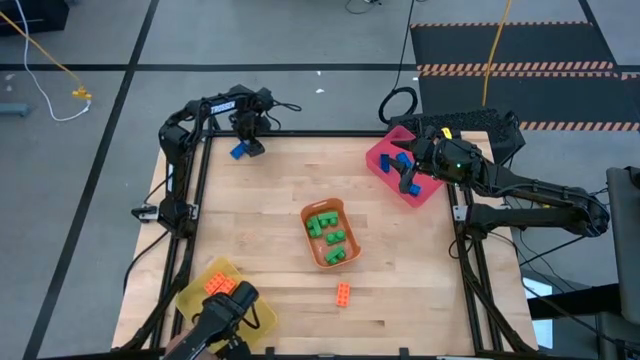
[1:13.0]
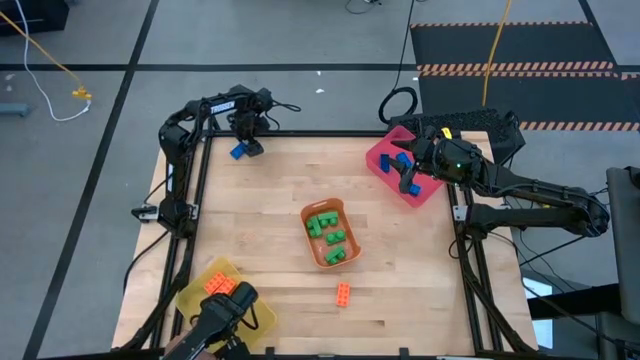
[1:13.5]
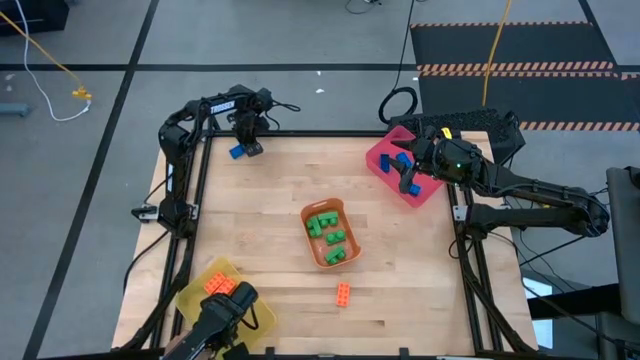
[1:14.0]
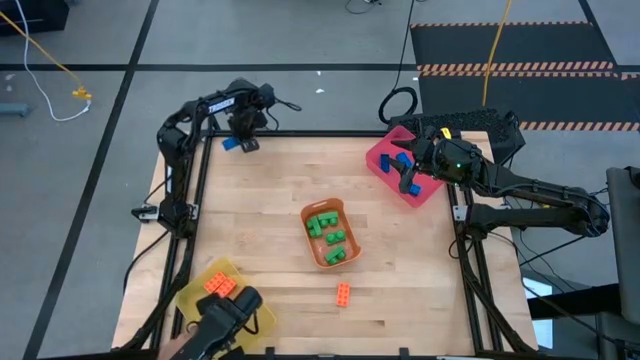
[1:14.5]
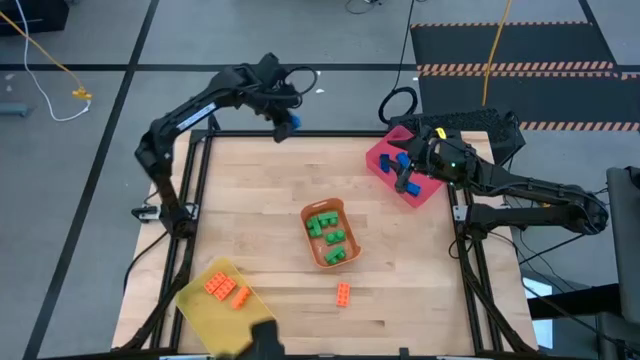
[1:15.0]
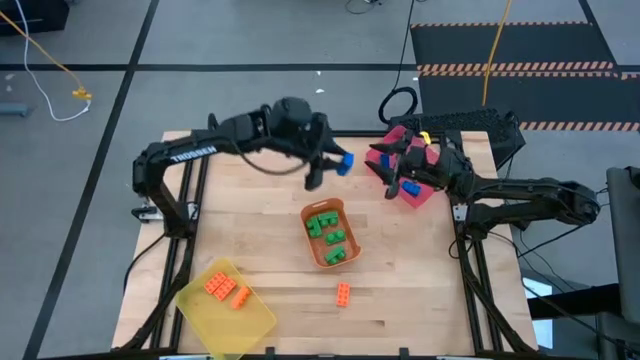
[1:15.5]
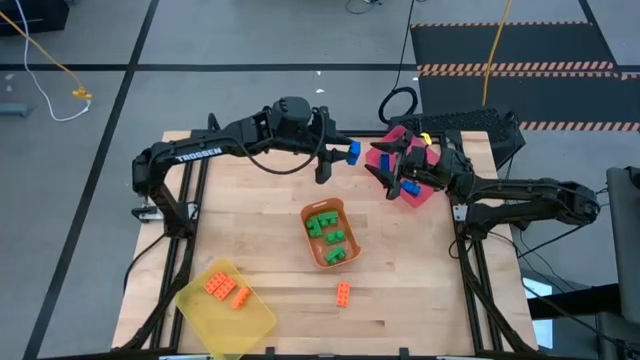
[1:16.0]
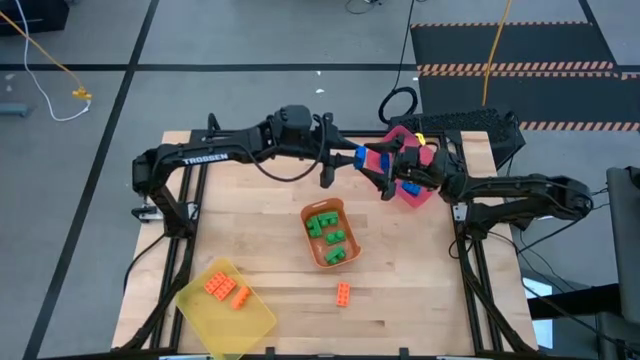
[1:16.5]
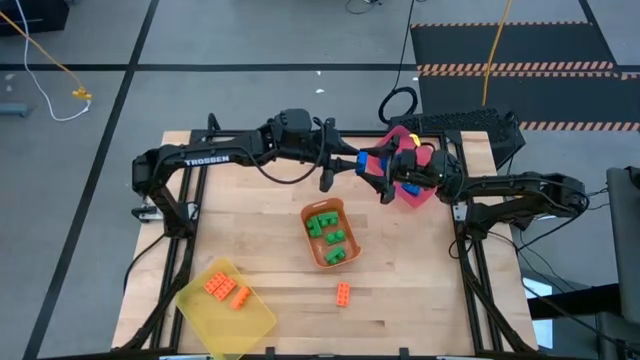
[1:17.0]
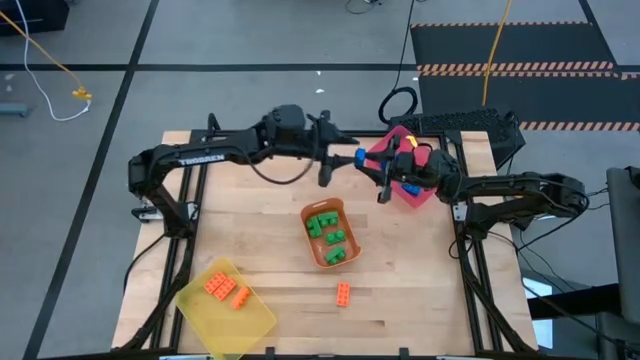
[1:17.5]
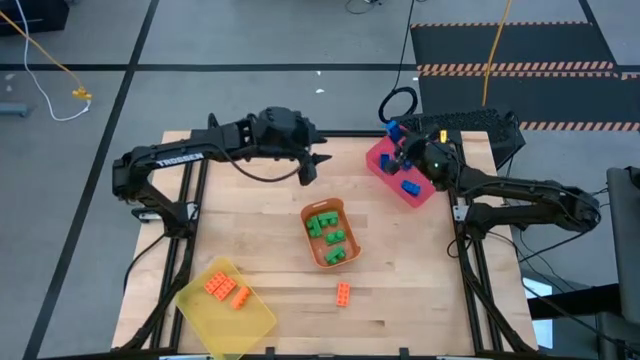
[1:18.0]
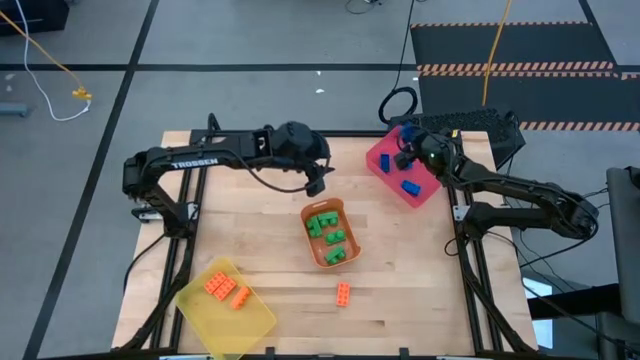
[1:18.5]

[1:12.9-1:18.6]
Task: Sort & place blocks by color
Put the blue game piece into the pink bin

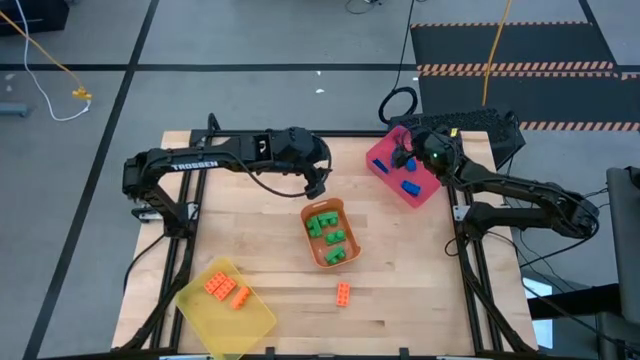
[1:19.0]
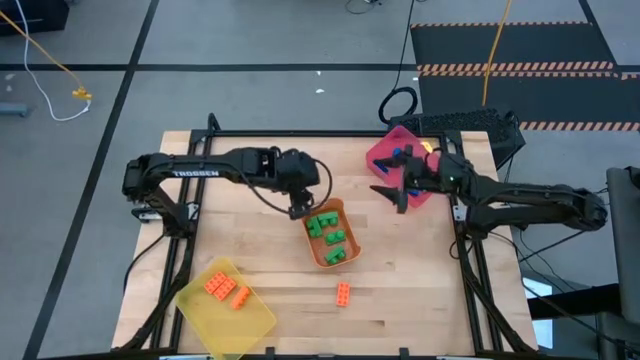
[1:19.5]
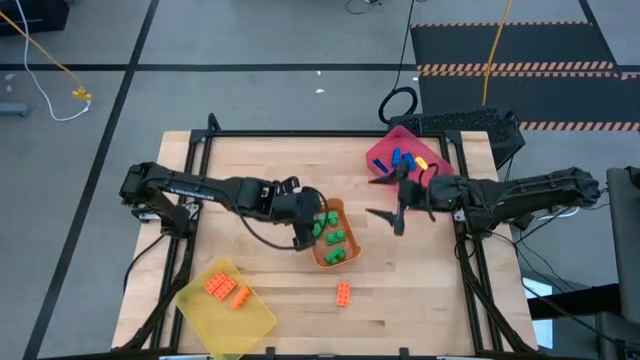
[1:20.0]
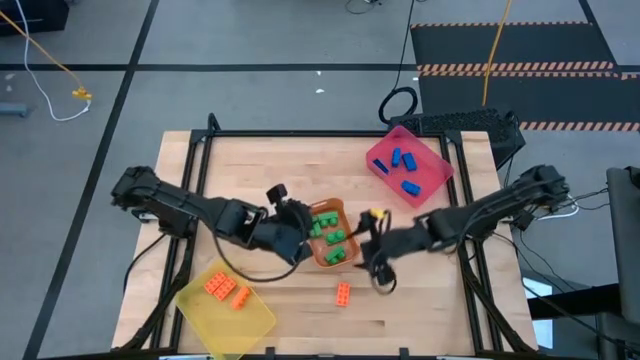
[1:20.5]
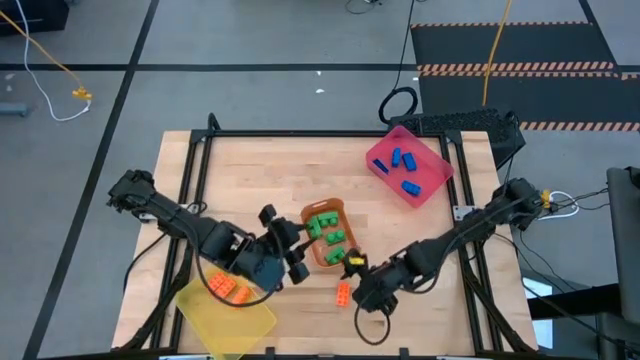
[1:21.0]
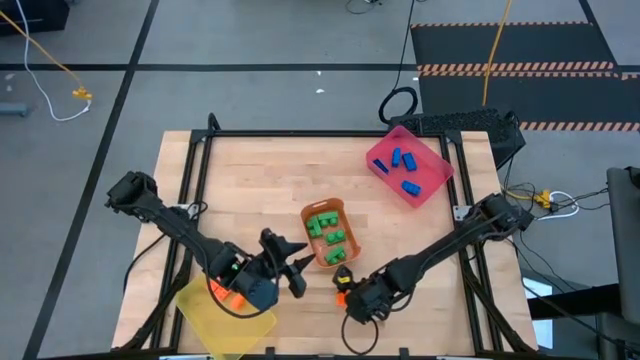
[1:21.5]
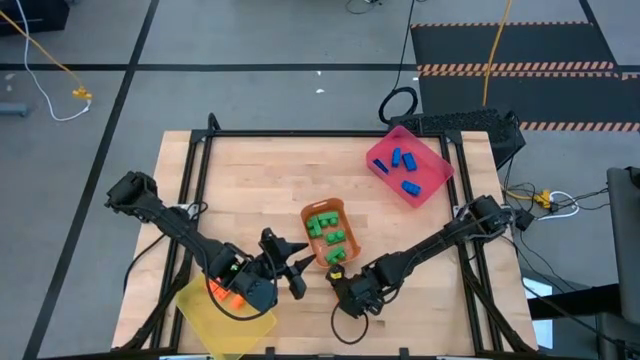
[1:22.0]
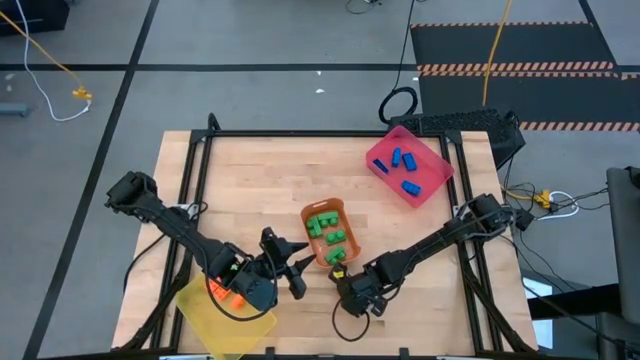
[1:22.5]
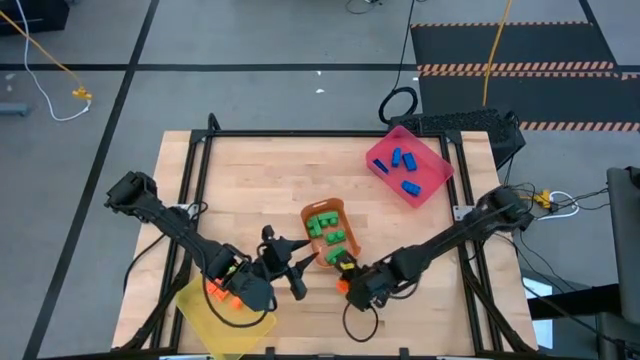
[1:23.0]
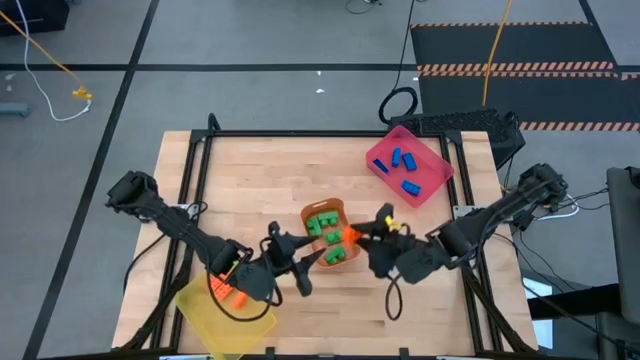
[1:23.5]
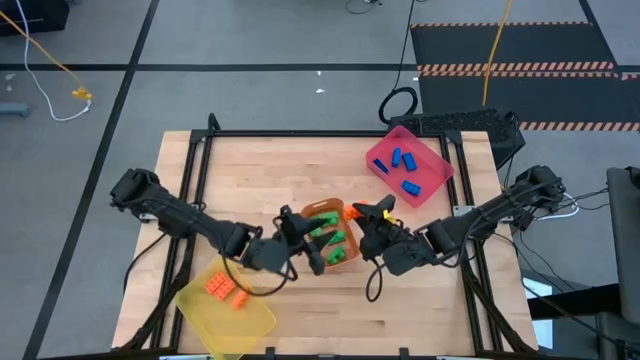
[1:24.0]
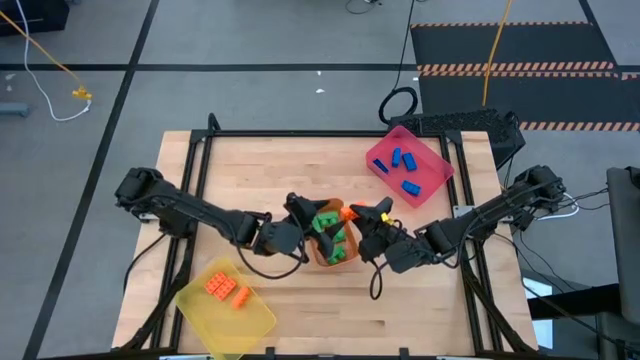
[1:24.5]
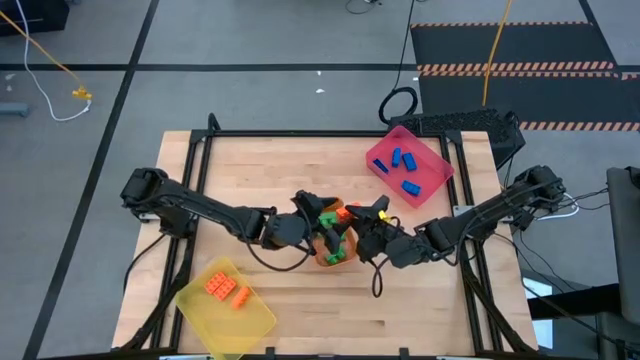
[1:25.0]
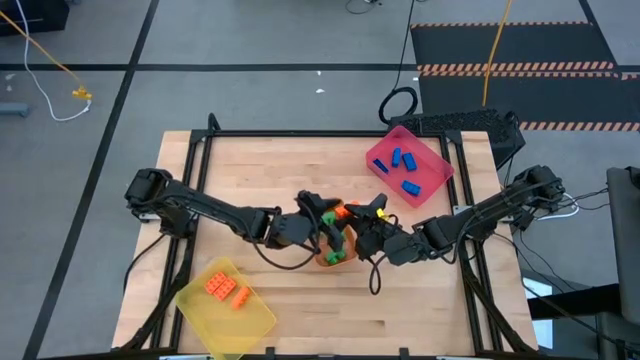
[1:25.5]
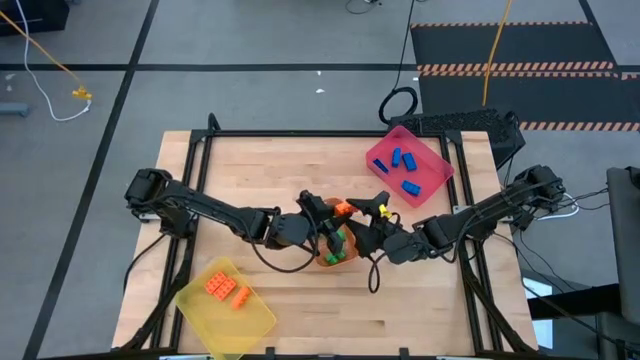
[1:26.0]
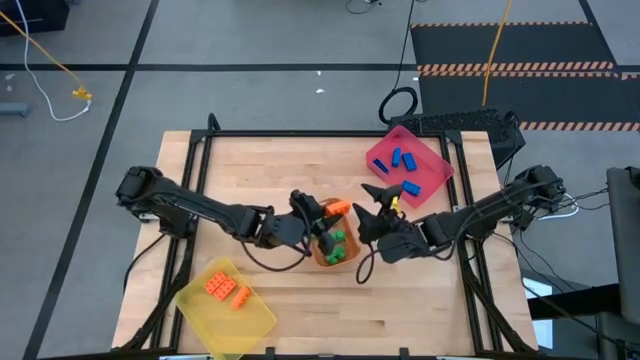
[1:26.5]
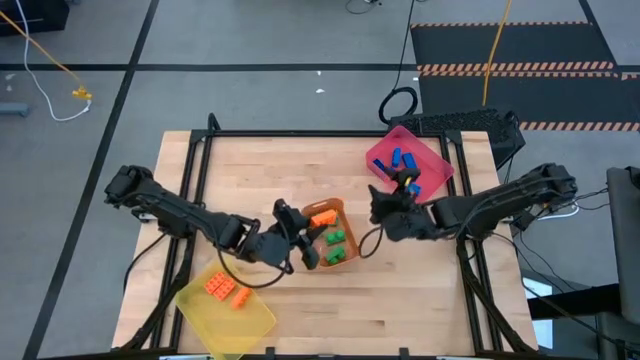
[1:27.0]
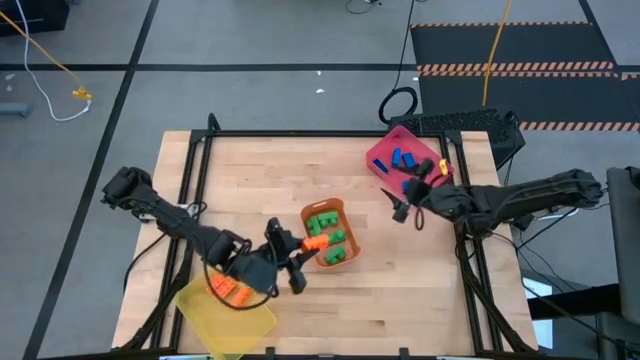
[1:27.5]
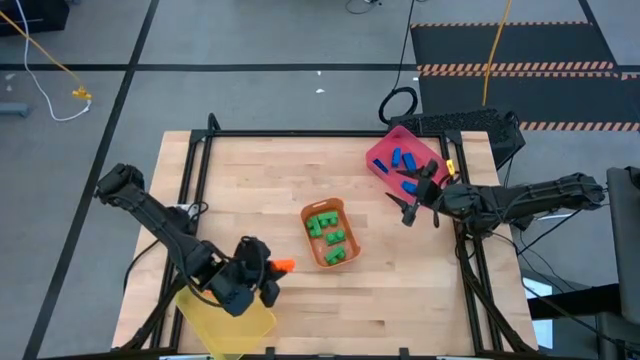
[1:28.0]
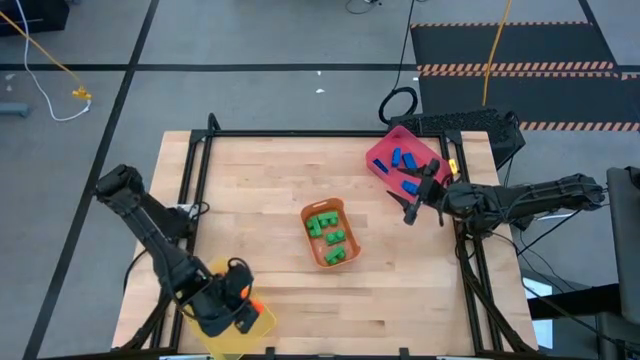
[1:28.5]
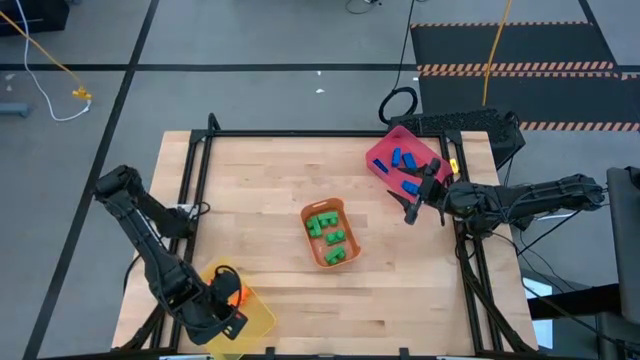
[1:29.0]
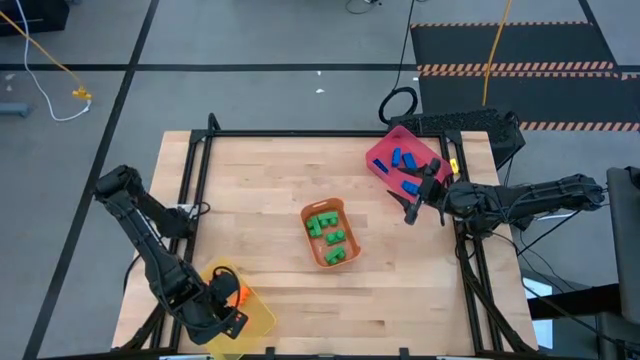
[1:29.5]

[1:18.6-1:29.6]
Put the orange game piece into the yellow bin

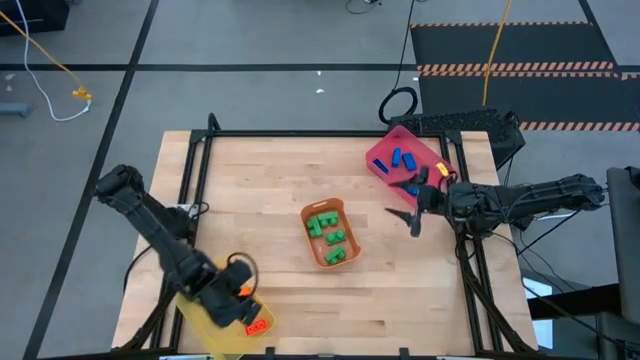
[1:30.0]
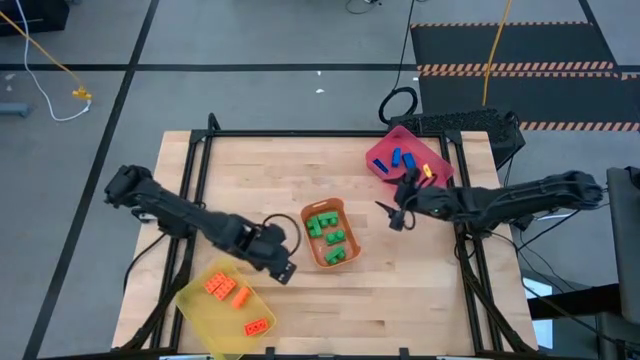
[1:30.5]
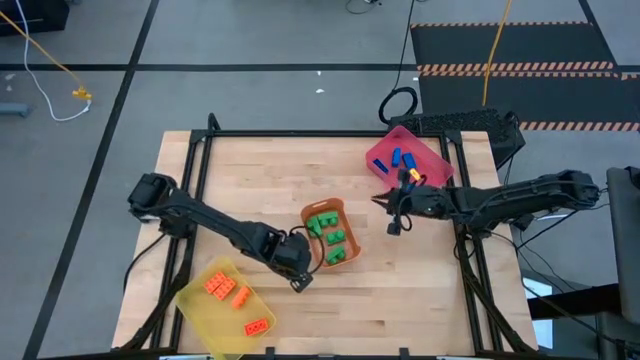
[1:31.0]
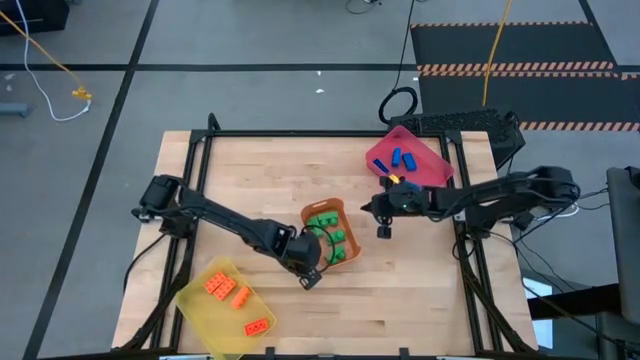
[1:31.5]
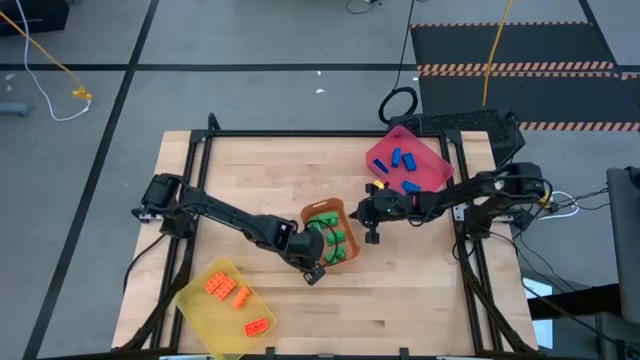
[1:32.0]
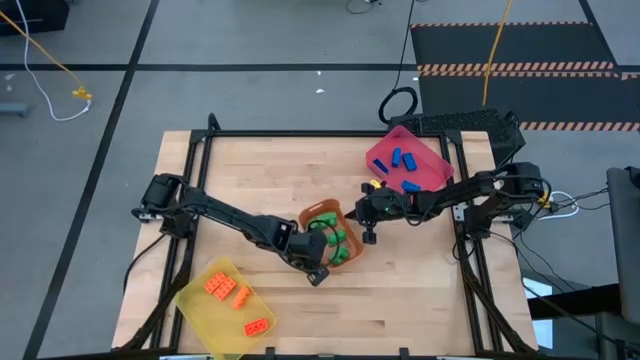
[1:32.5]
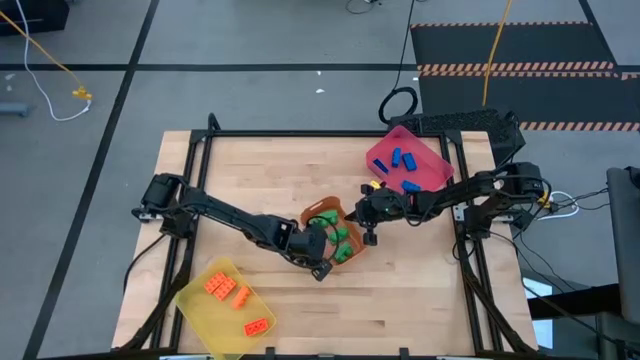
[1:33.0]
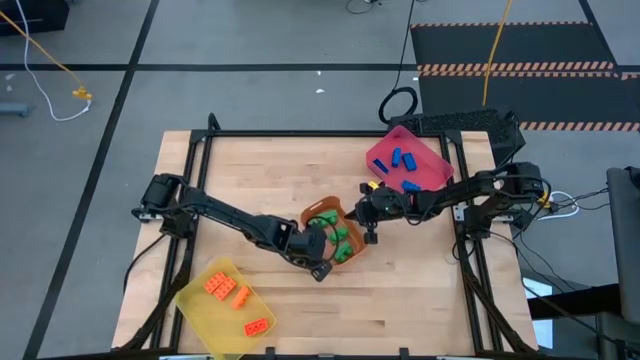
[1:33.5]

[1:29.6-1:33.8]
Adjust the orange bin on the table
